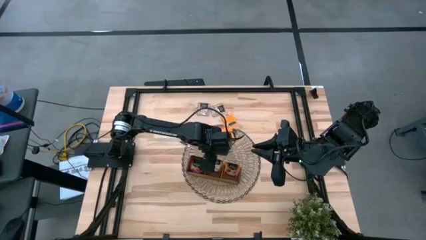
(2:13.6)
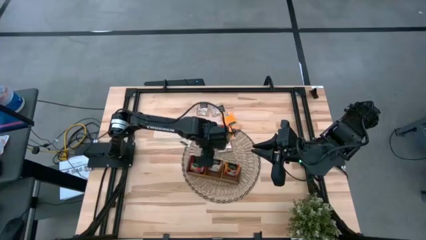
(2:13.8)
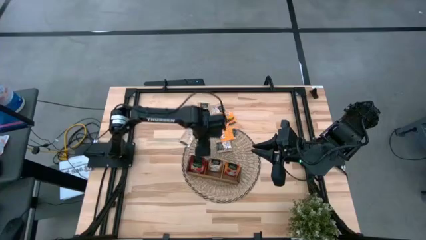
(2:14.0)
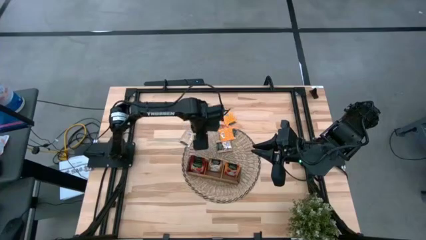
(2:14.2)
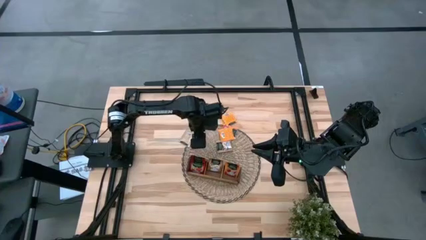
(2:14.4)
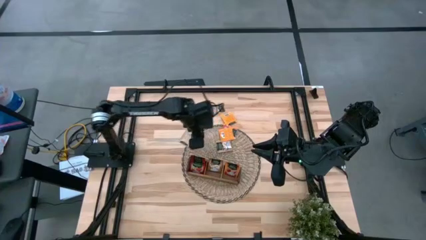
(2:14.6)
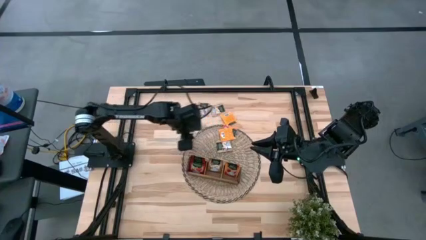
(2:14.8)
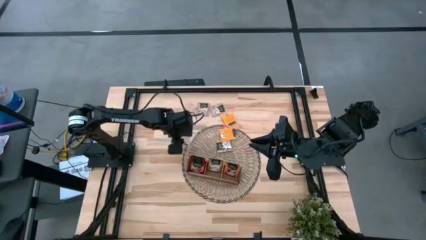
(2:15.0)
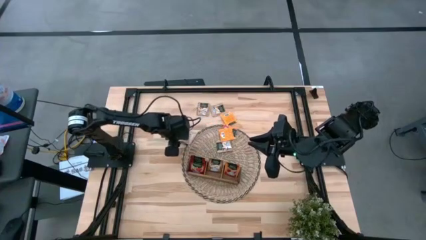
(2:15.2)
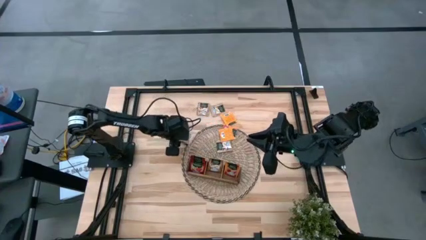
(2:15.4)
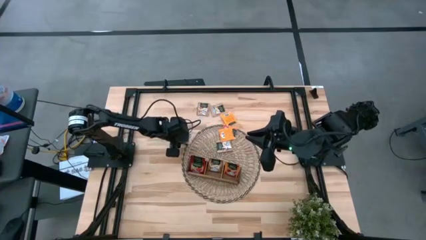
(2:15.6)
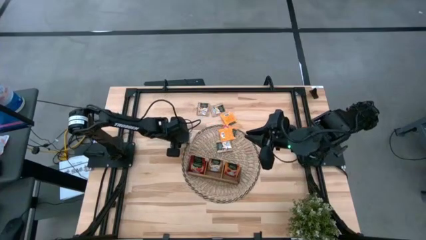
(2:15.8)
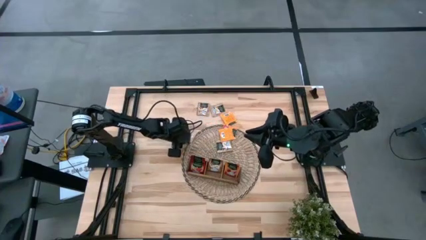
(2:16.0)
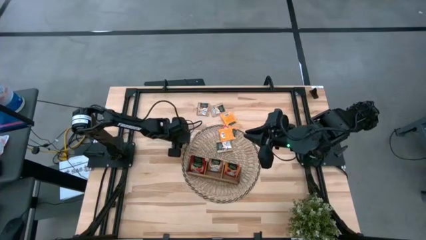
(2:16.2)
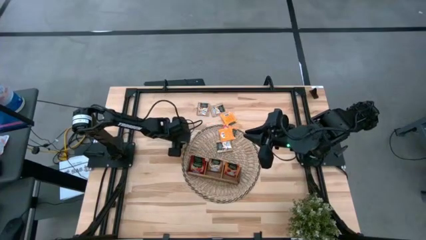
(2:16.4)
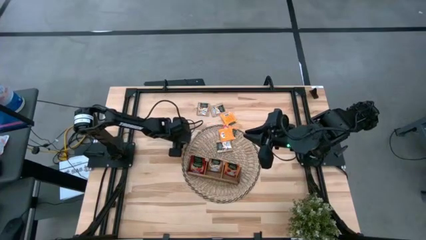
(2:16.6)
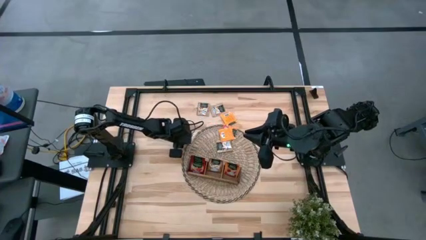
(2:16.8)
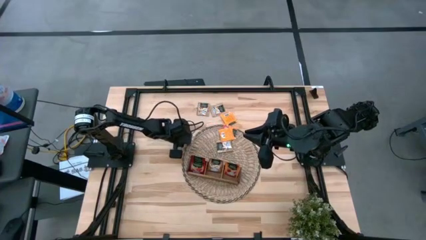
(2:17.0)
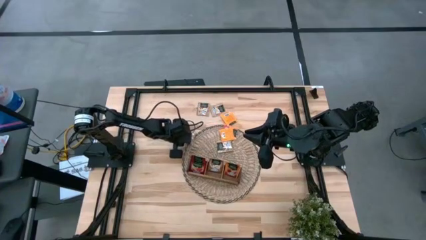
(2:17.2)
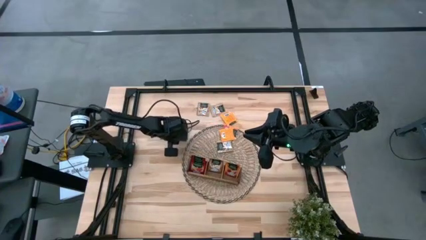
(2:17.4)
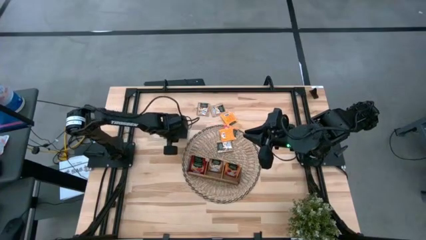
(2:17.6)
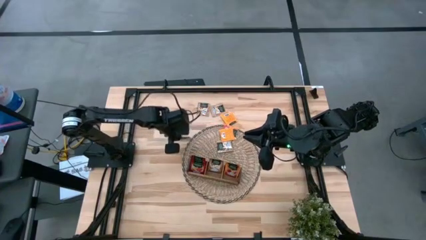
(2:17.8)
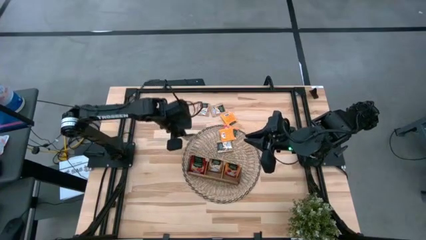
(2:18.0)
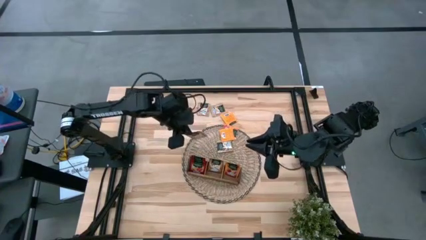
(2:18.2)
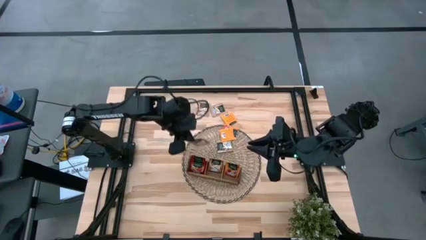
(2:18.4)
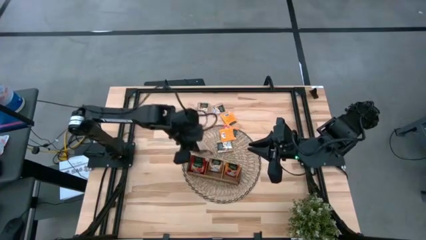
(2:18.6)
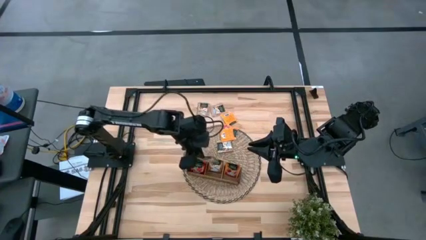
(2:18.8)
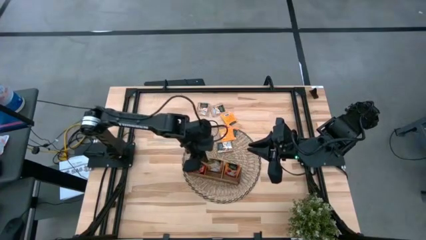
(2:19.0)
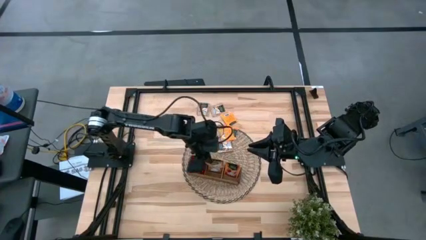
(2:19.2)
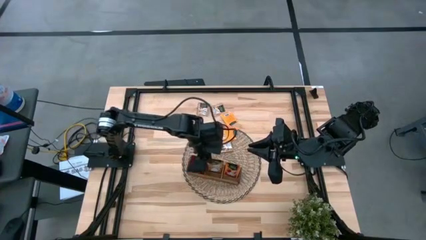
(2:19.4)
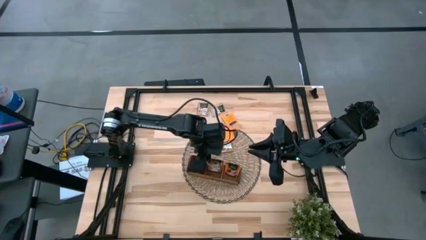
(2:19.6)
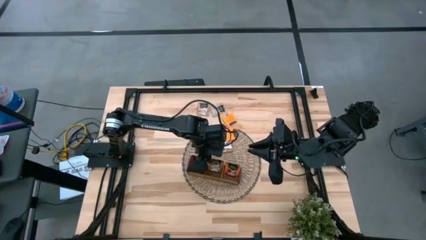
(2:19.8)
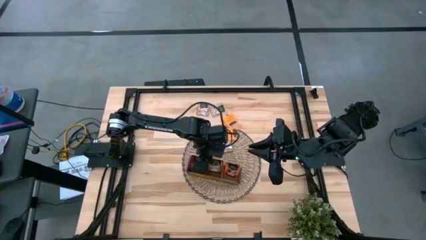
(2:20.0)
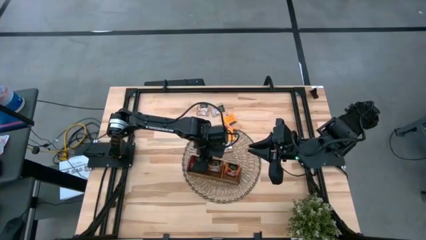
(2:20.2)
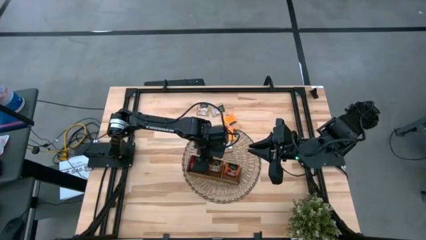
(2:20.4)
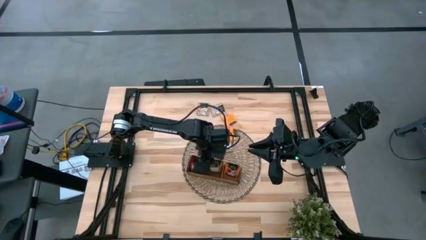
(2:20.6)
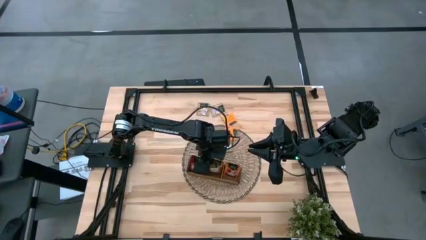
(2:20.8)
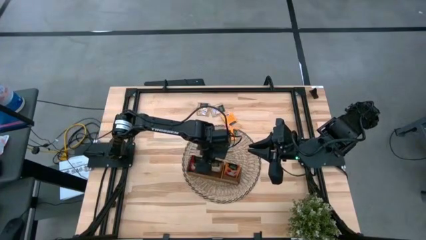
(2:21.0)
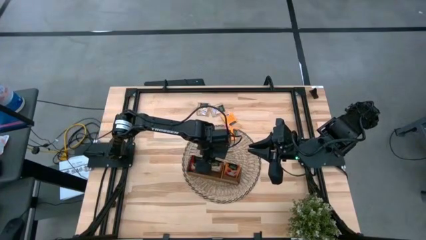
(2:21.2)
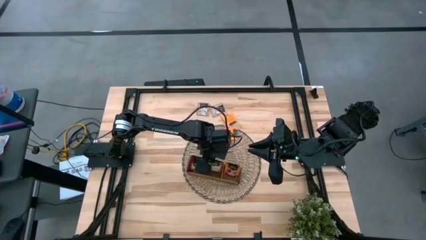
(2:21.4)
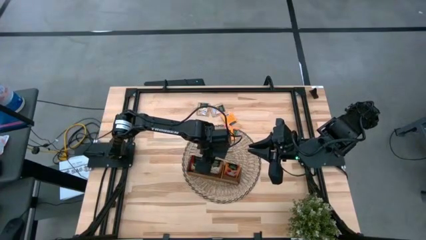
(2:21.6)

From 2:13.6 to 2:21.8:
Task: Pick & Place Tea
Put the brown tea bag into the middle section of the wooden organizer

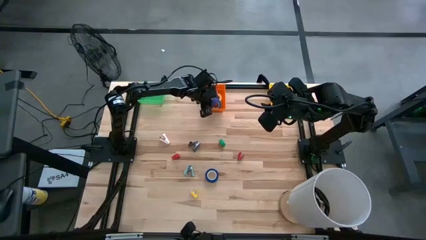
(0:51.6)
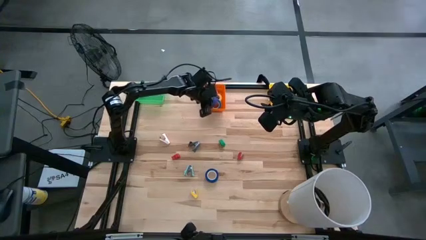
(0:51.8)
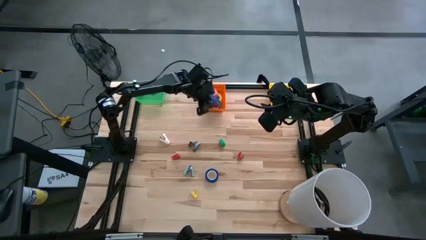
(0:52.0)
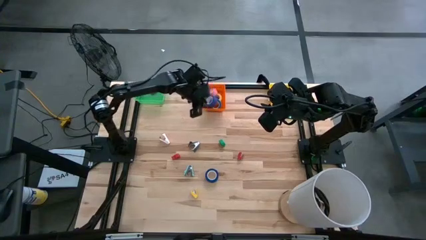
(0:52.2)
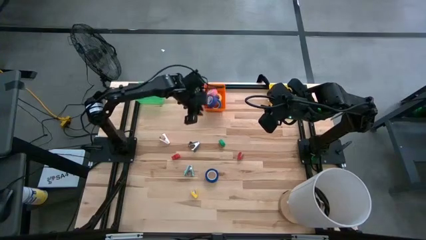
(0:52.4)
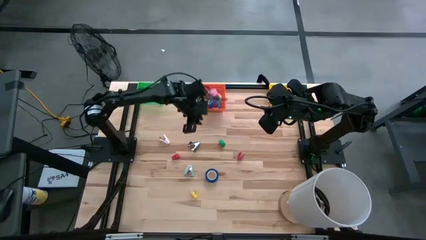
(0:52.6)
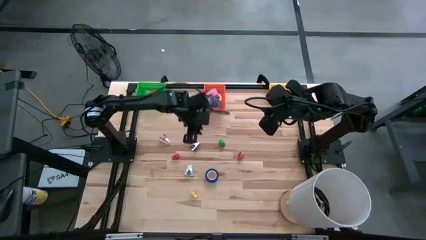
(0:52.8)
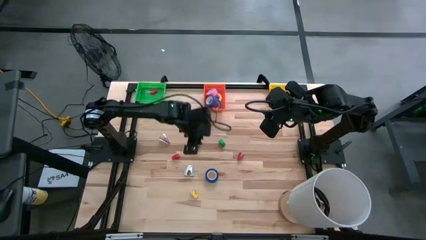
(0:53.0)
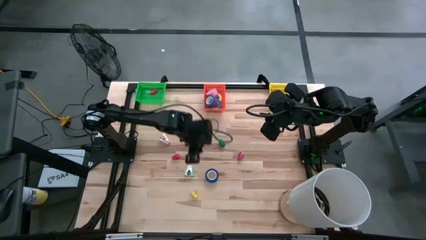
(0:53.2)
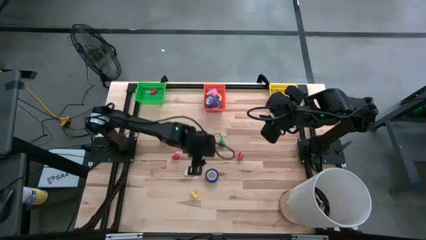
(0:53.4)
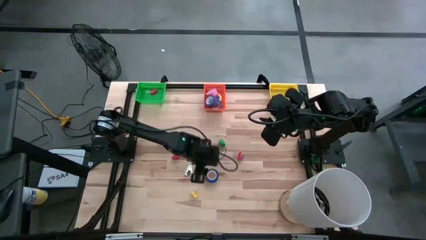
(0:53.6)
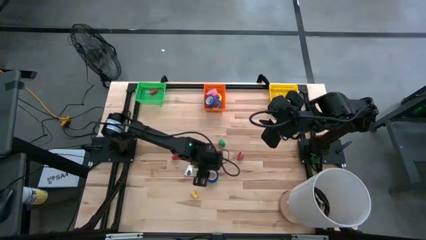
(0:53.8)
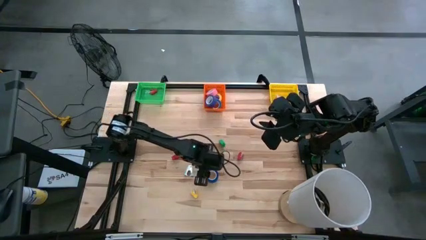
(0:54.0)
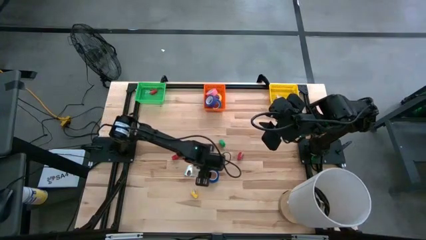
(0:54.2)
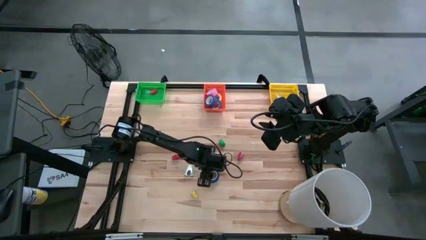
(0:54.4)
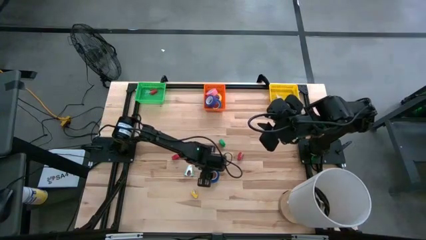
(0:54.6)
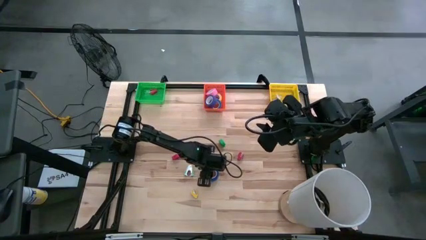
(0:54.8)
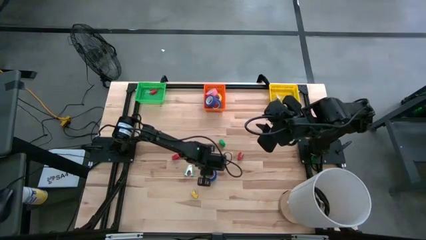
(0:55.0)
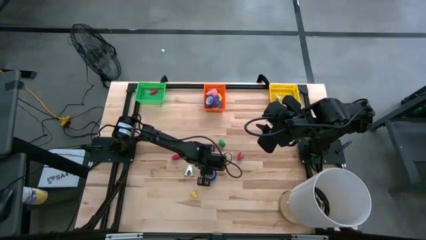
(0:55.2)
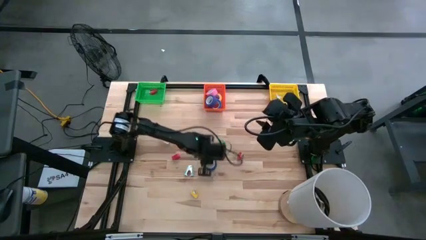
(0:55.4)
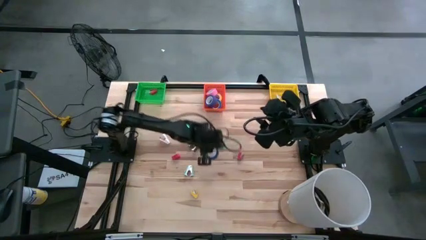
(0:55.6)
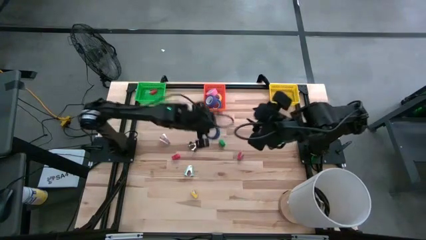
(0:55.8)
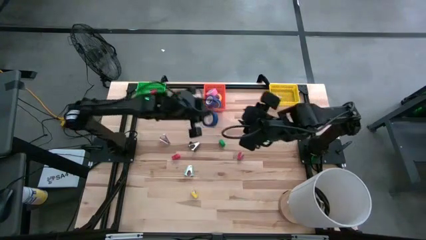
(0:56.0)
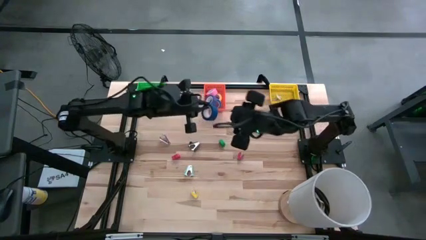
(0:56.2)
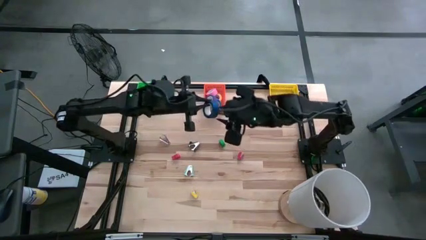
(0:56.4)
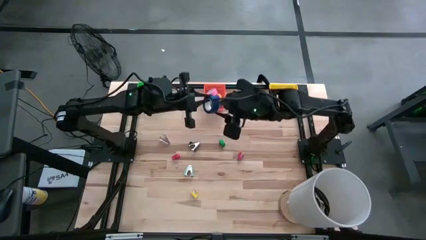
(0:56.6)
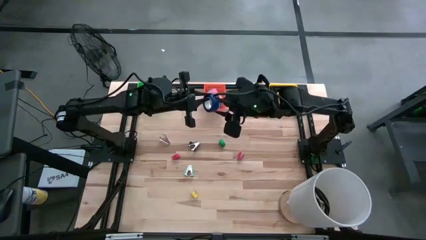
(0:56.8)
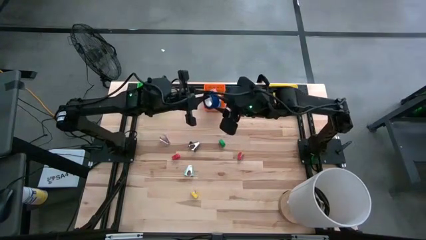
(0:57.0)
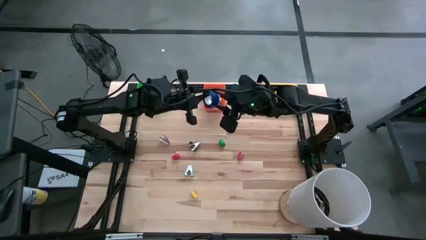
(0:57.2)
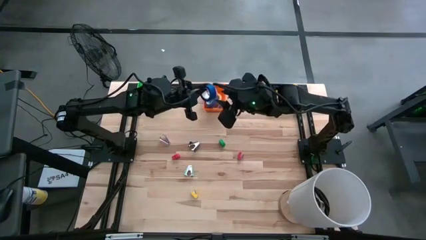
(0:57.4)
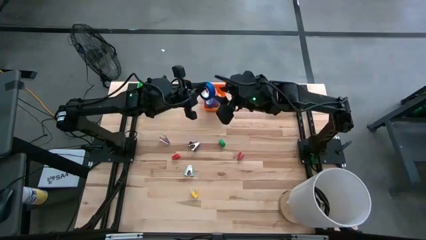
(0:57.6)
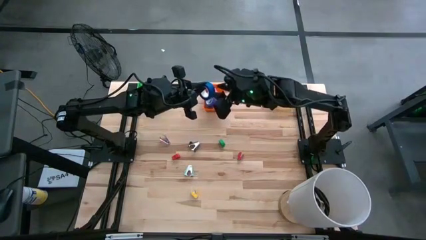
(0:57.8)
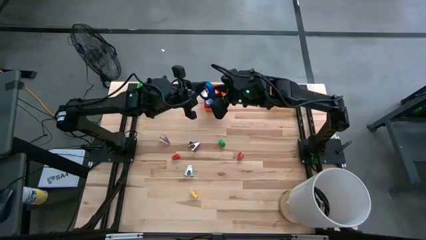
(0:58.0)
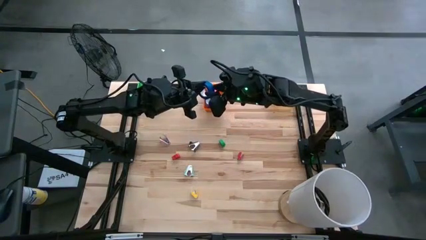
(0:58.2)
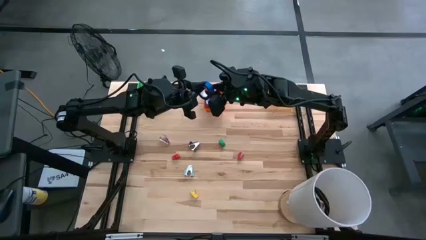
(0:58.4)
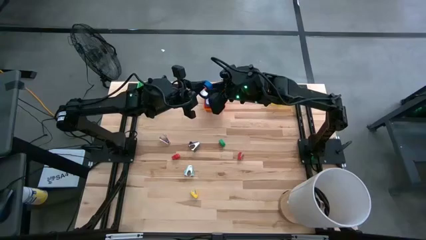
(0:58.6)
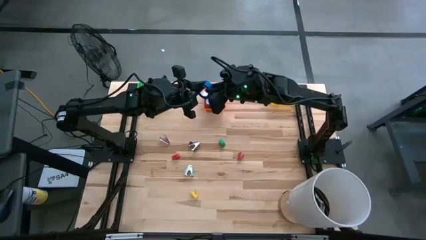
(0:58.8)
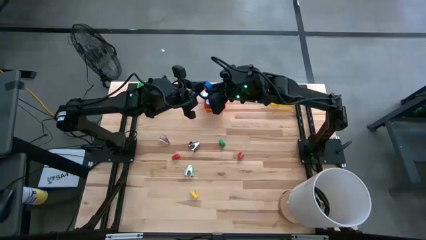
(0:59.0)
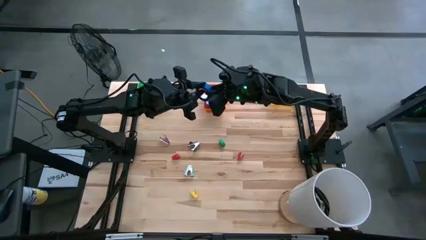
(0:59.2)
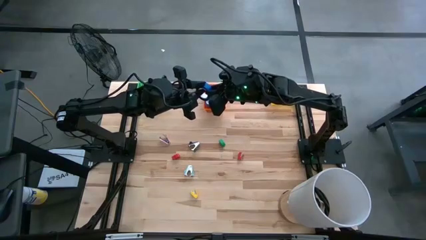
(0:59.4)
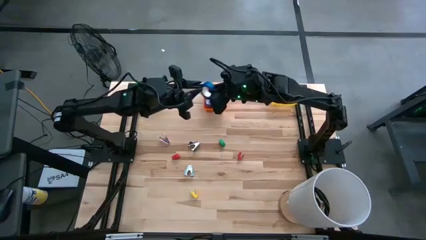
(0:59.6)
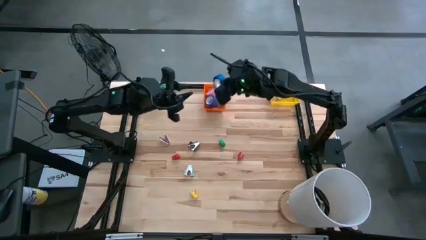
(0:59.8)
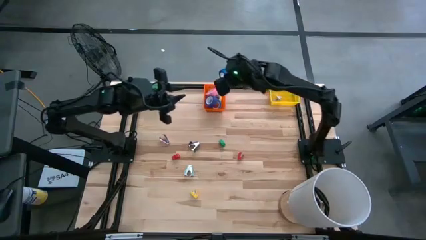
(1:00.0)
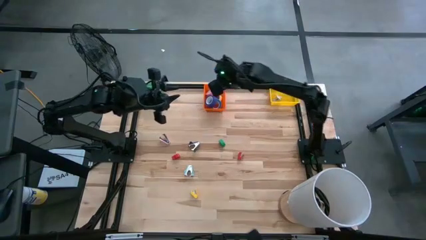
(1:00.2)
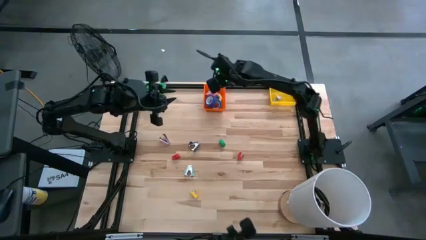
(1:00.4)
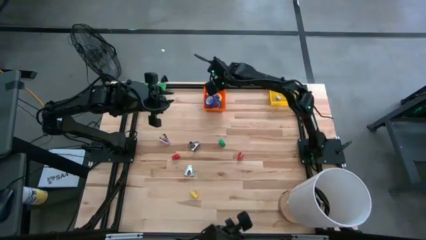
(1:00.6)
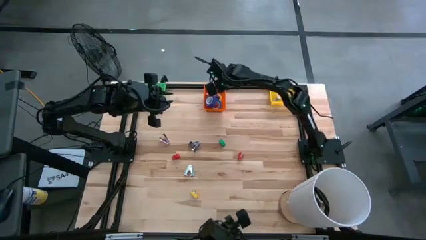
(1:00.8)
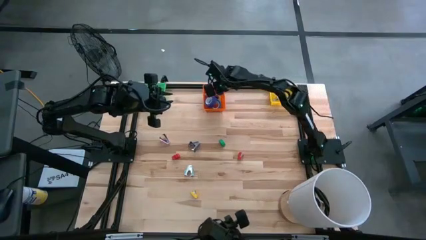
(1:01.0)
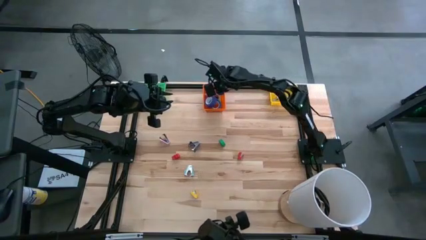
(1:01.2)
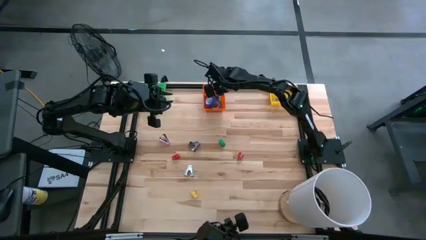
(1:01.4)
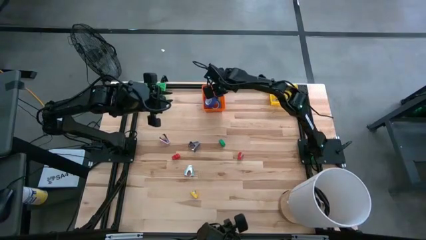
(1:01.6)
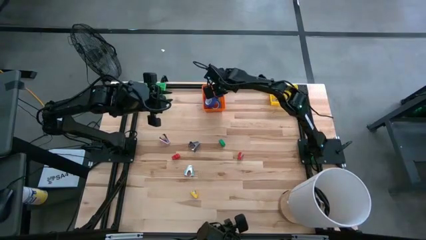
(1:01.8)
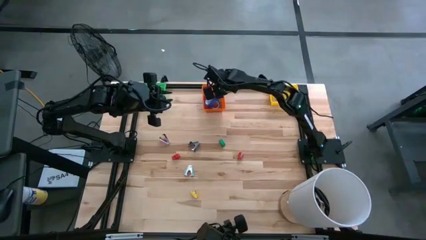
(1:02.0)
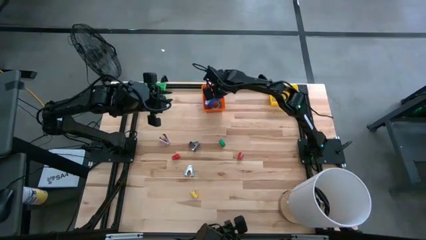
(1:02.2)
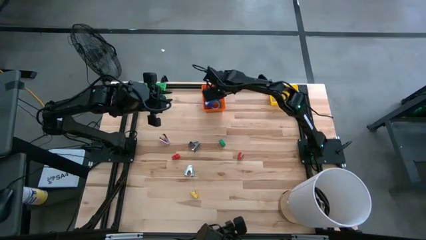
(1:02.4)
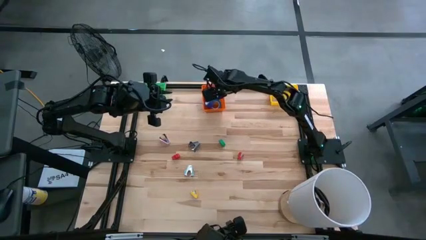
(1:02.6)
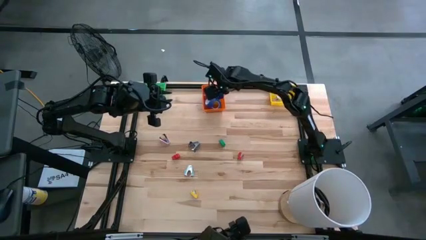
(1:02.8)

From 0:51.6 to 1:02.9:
Task: Pick and place Stapler, Stapler remover, tape
Put the blue tape into the orange bin
